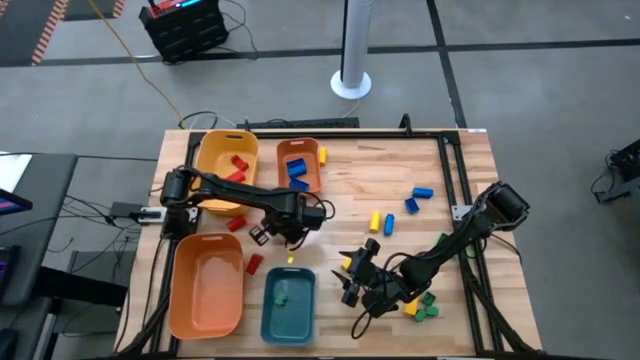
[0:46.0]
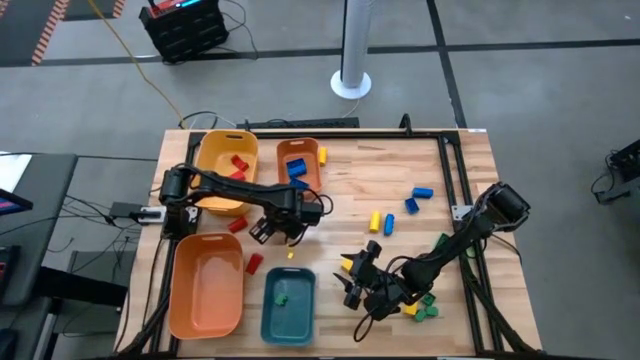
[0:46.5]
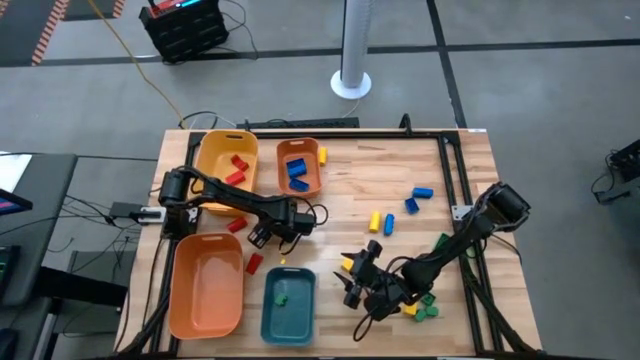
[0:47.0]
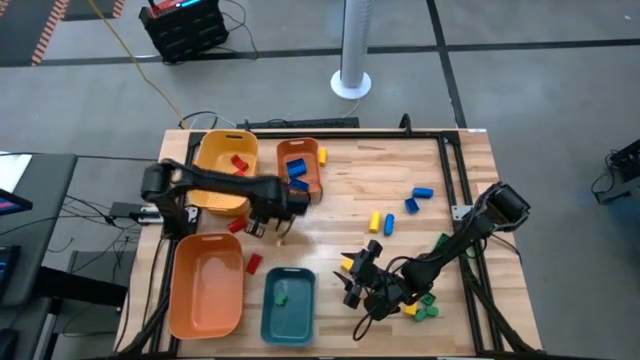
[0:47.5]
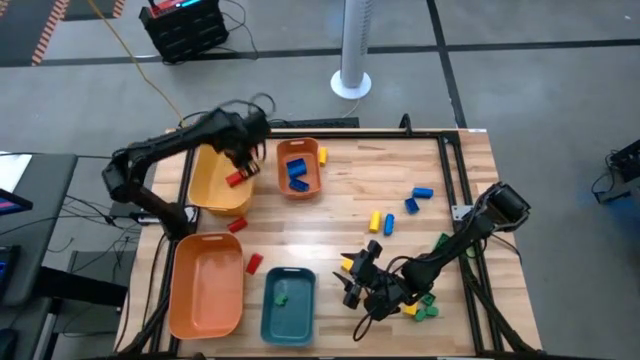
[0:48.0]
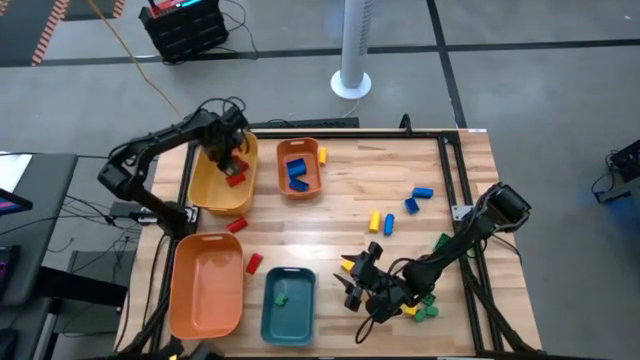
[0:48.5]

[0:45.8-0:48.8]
Task: Sort blocks
Put the red wooden block into the yellow bin

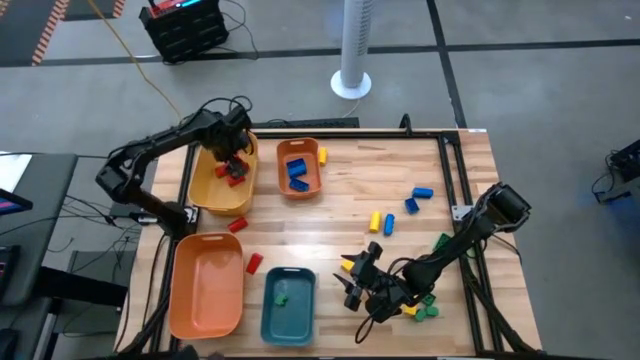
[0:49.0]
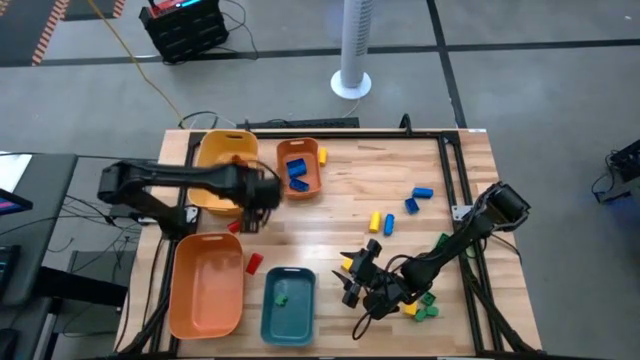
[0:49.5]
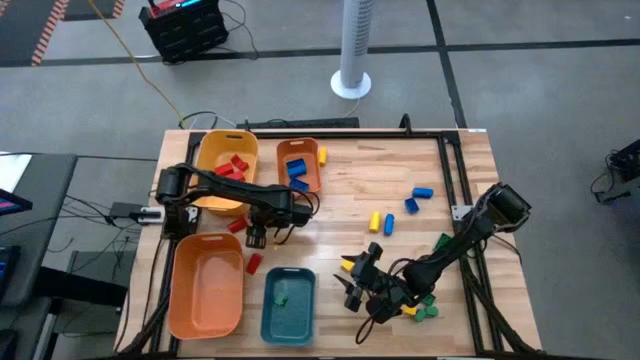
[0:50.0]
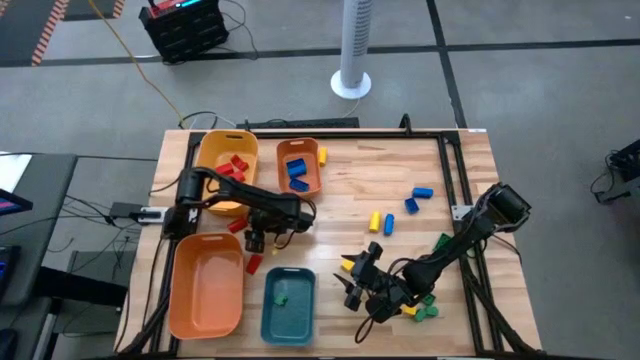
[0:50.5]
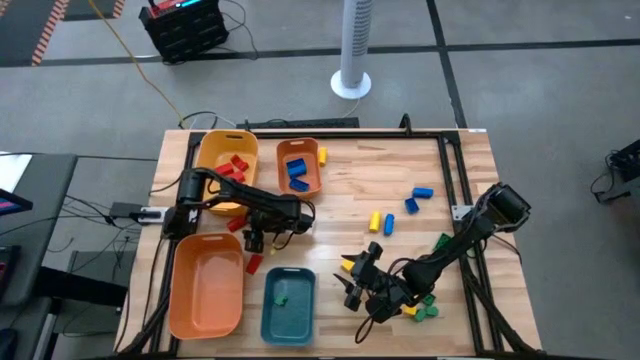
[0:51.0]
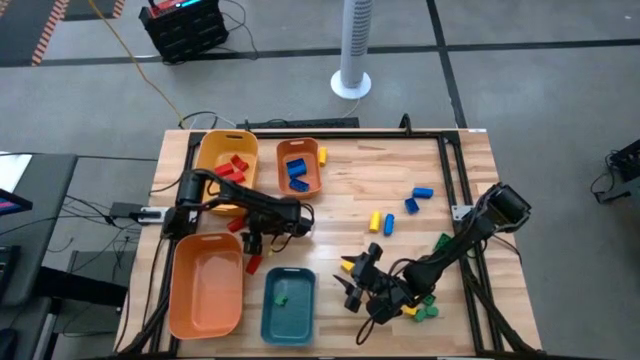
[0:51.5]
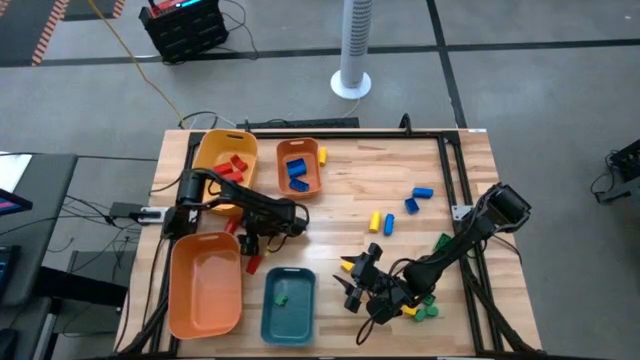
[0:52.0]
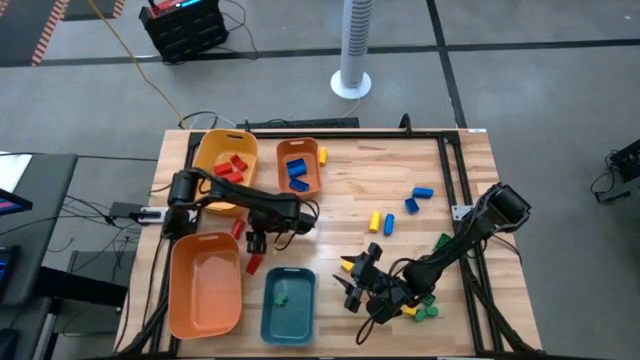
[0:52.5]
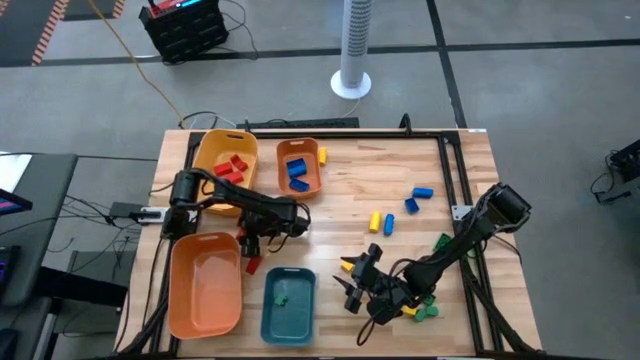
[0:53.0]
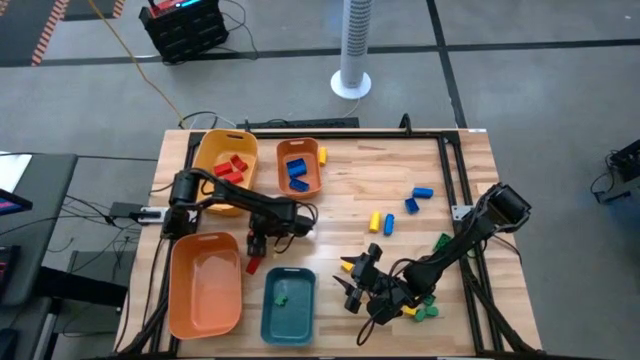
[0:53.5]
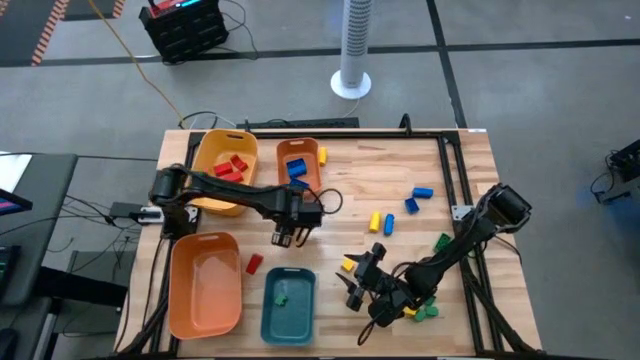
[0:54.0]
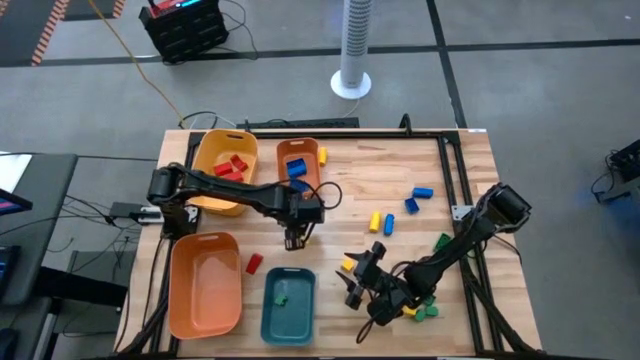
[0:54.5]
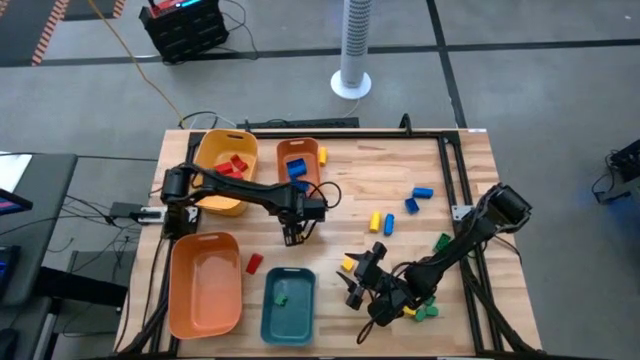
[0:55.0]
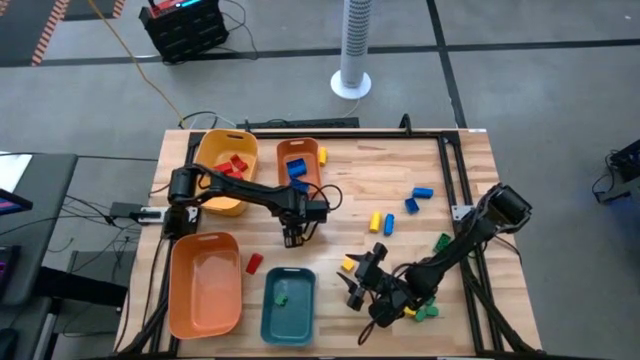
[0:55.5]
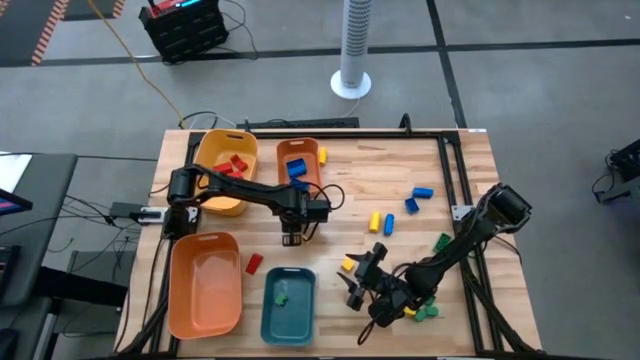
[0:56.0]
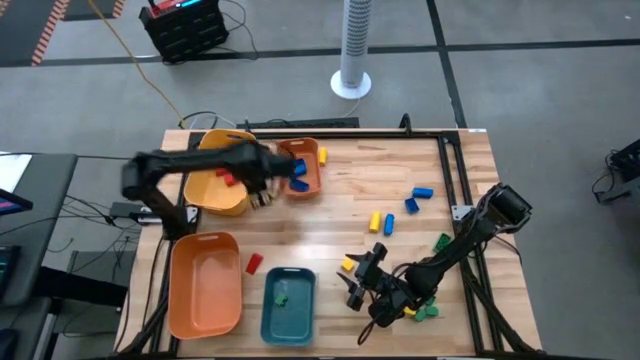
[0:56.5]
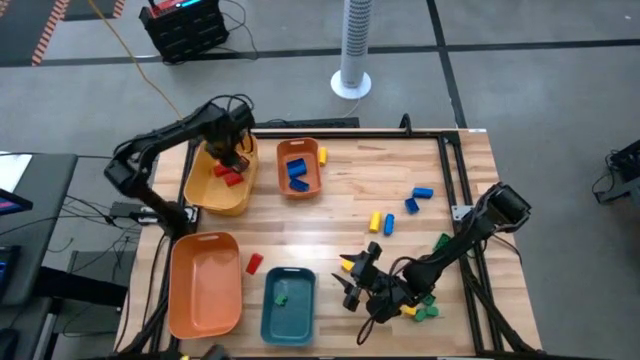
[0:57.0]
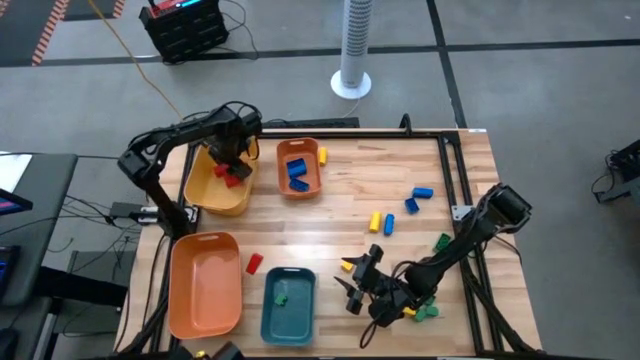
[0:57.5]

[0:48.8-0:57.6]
Put the red wooden block into the yellow bin

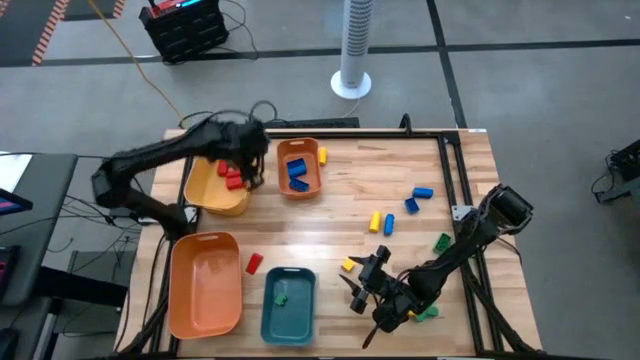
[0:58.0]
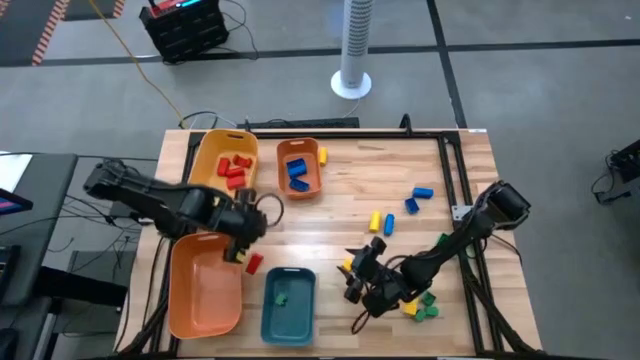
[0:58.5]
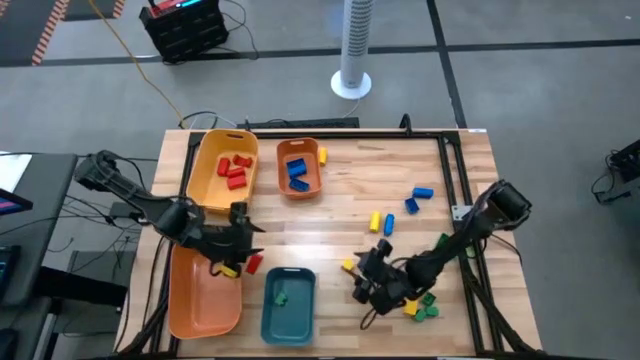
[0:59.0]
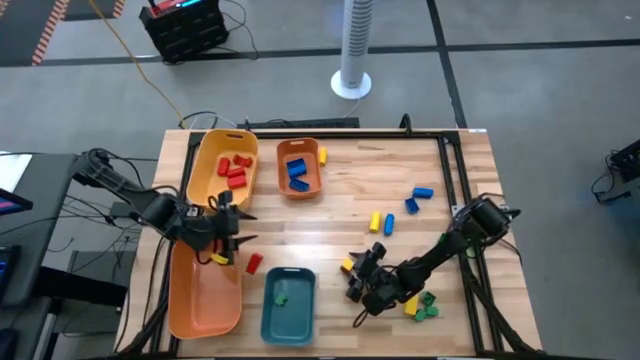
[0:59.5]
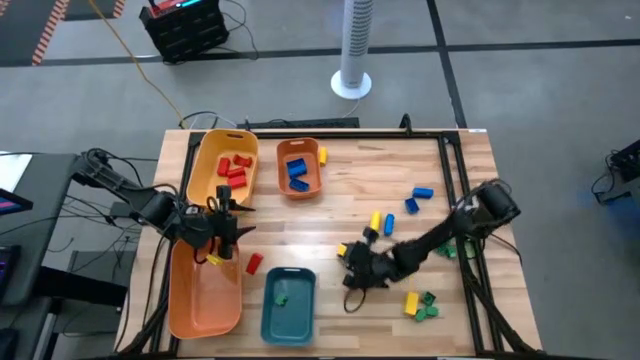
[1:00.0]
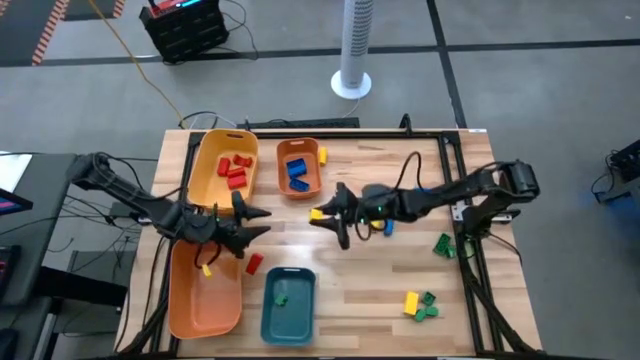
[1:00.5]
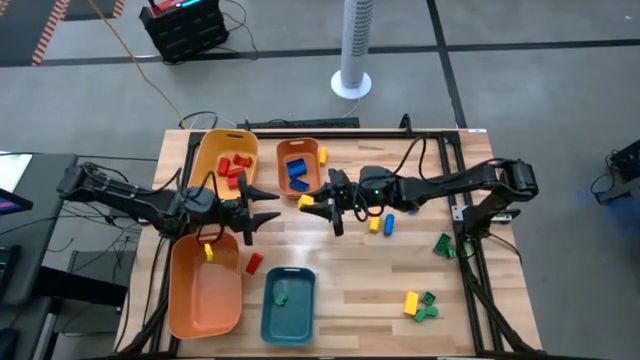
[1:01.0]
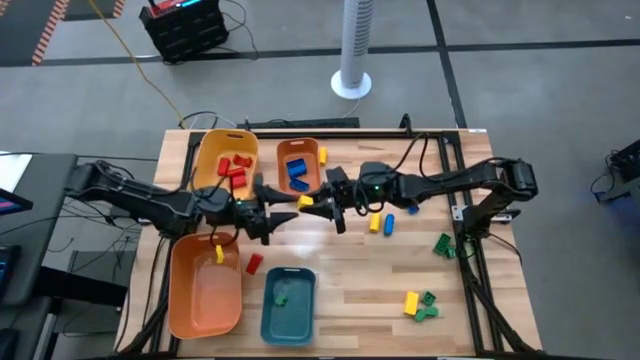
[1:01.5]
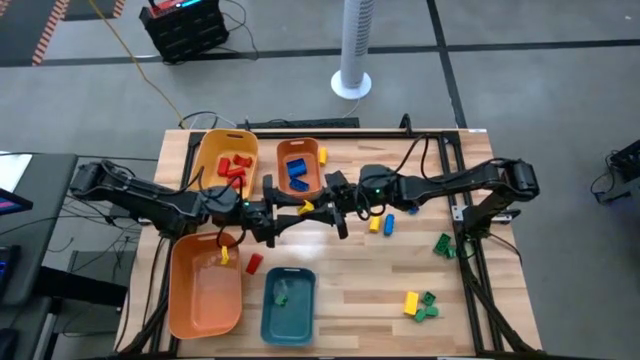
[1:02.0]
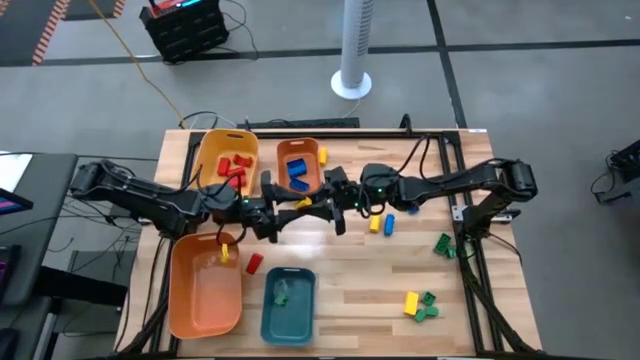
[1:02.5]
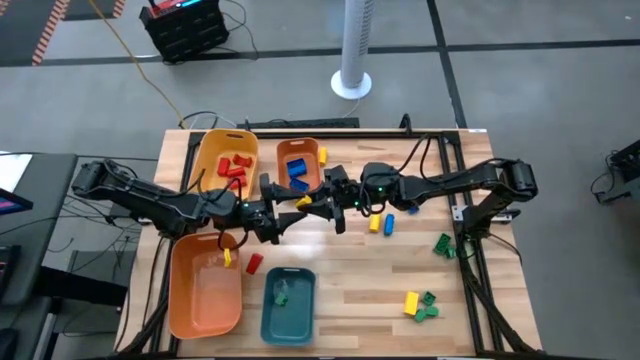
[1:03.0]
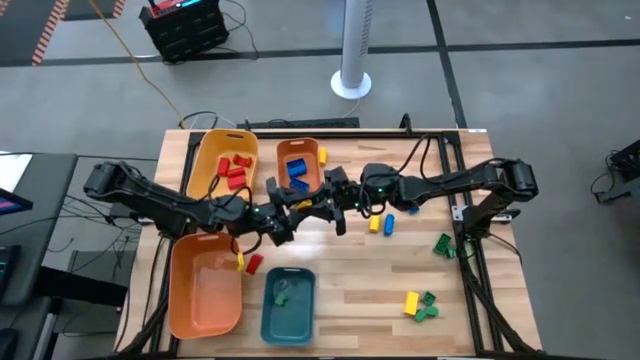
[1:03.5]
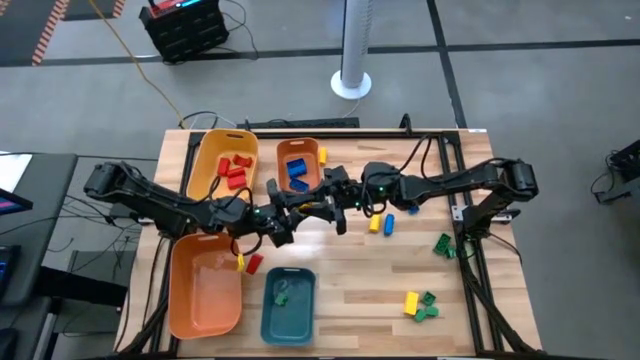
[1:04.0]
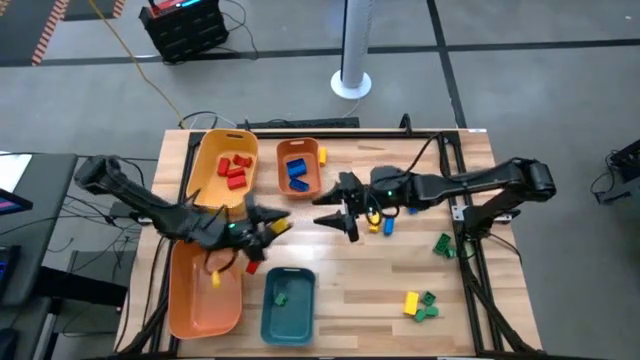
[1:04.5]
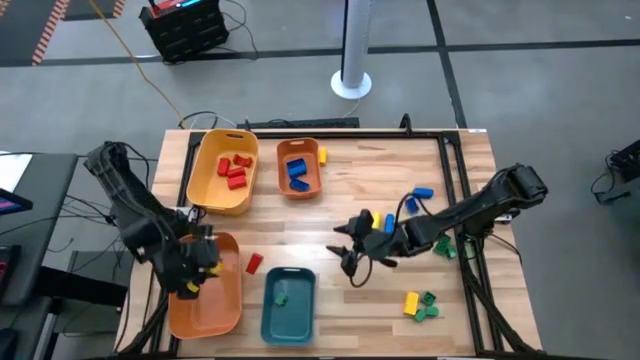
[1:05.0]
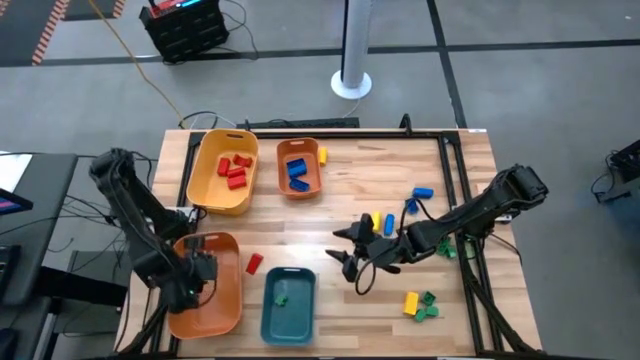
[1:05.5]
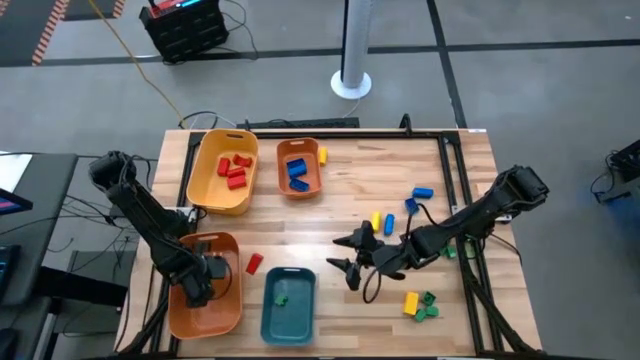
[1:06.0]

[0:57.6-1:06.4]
Put the yellow wooden block into the bottom orange bin
